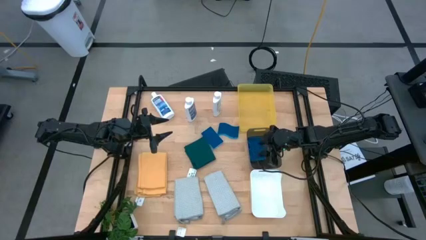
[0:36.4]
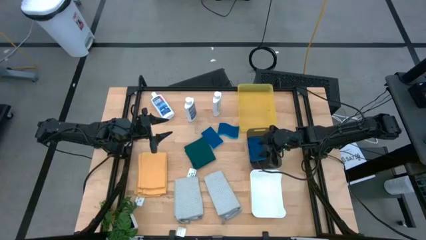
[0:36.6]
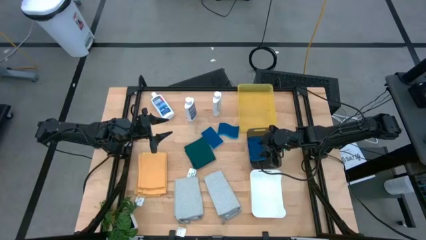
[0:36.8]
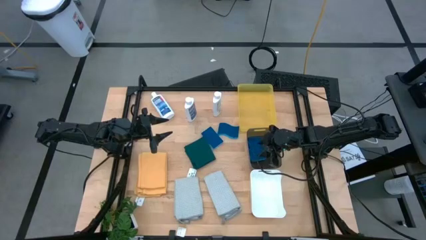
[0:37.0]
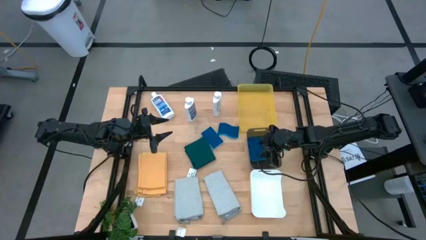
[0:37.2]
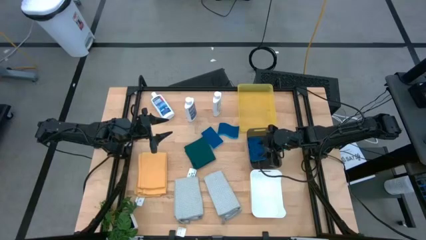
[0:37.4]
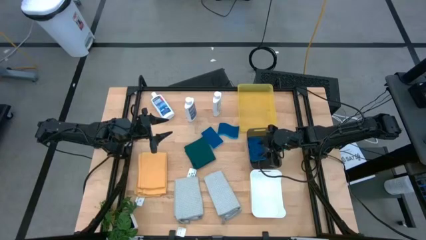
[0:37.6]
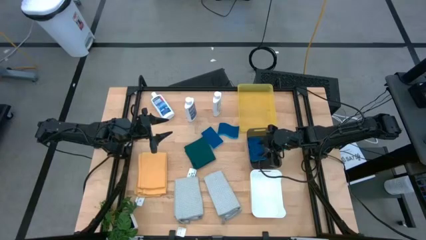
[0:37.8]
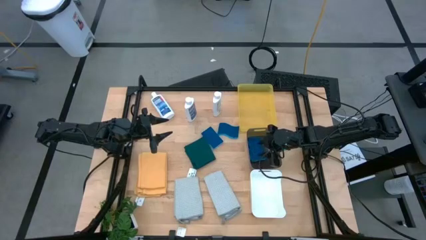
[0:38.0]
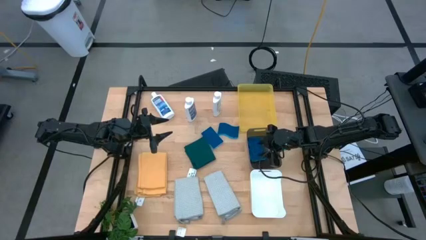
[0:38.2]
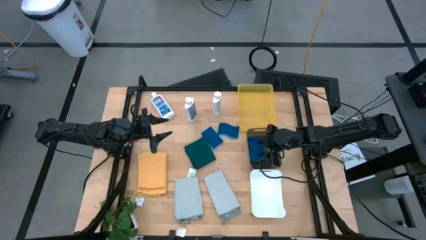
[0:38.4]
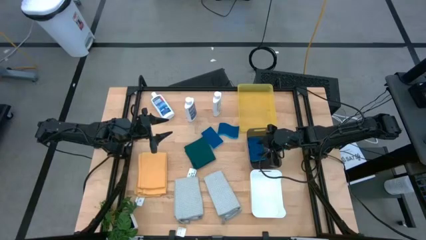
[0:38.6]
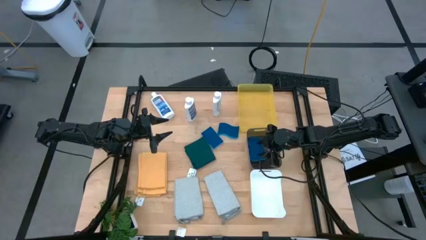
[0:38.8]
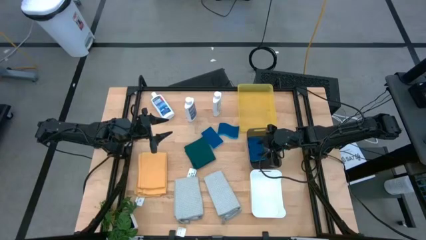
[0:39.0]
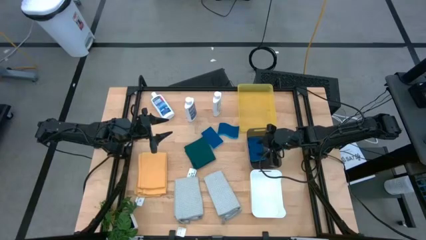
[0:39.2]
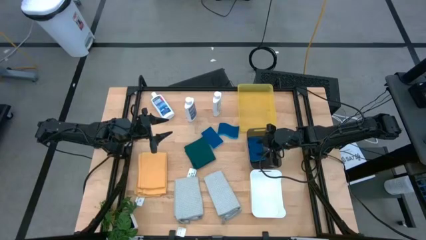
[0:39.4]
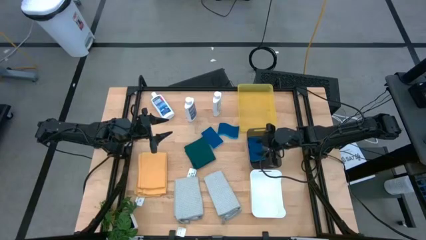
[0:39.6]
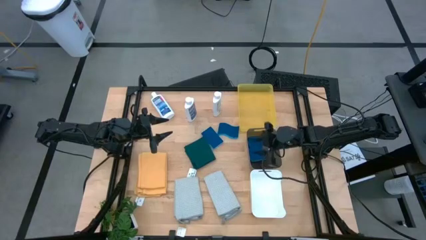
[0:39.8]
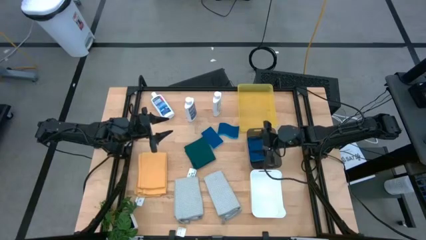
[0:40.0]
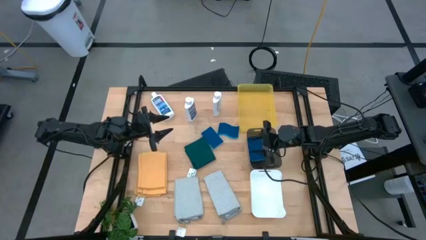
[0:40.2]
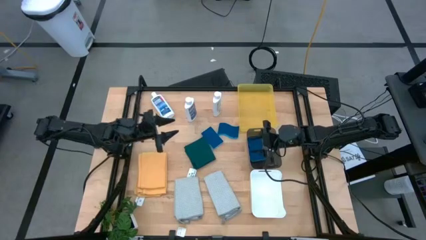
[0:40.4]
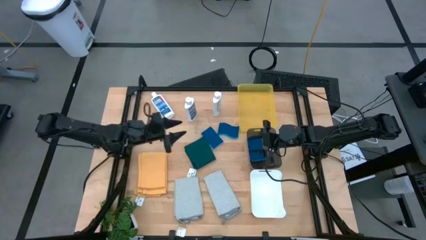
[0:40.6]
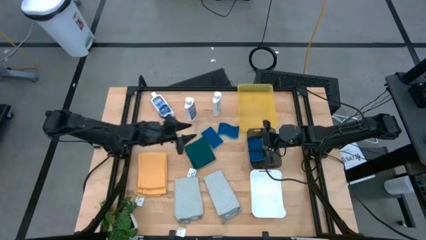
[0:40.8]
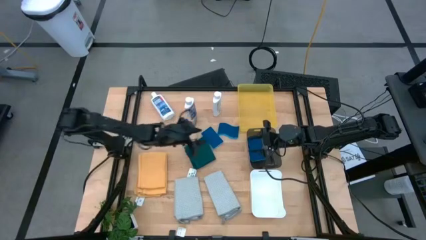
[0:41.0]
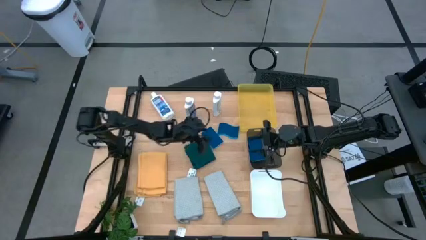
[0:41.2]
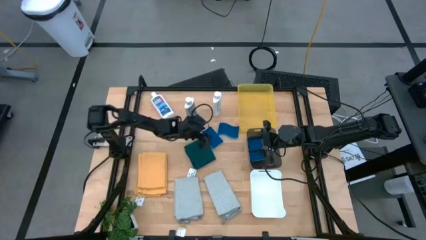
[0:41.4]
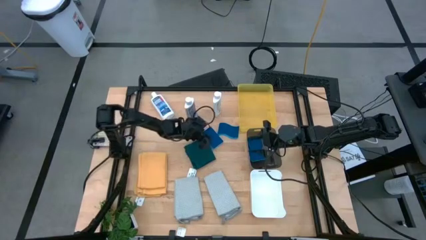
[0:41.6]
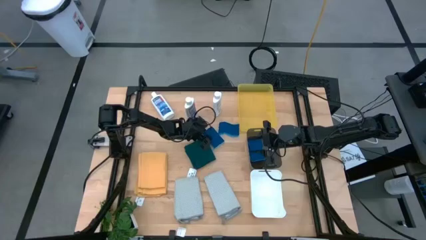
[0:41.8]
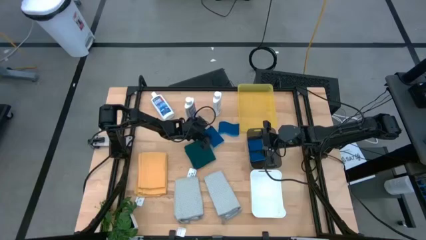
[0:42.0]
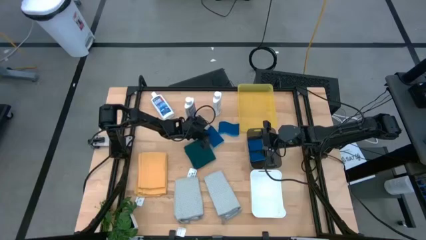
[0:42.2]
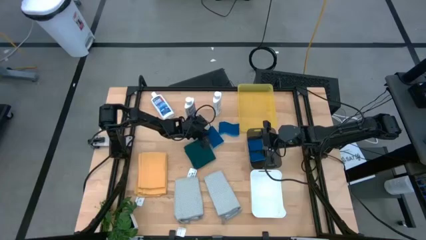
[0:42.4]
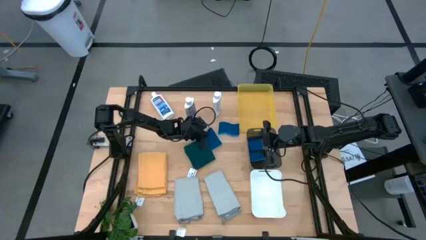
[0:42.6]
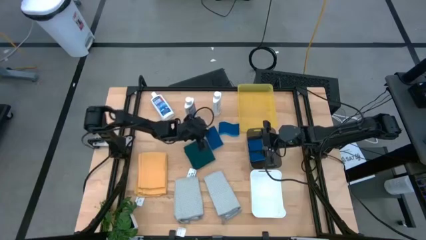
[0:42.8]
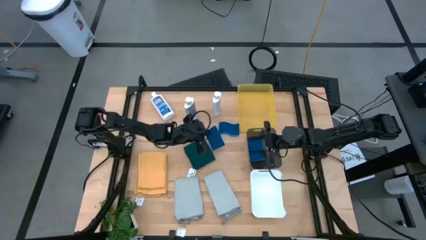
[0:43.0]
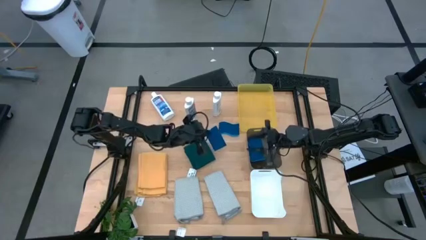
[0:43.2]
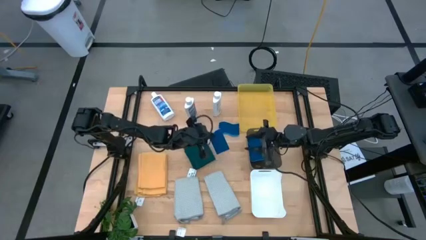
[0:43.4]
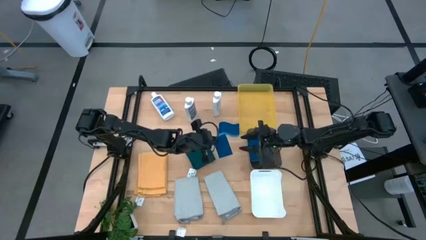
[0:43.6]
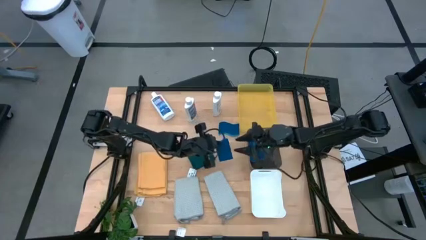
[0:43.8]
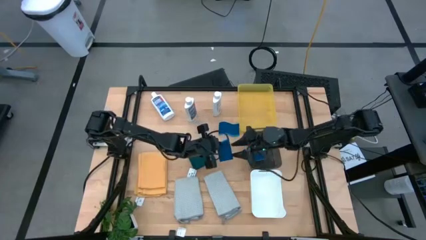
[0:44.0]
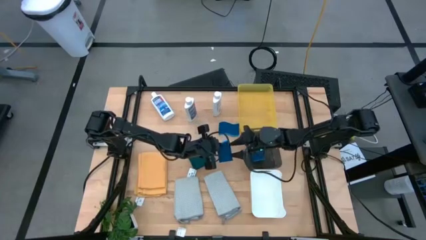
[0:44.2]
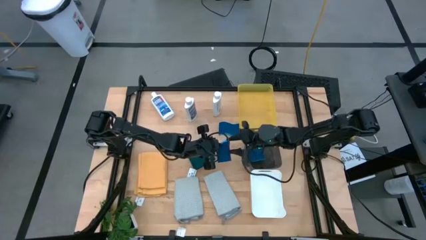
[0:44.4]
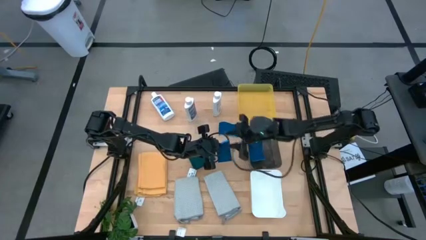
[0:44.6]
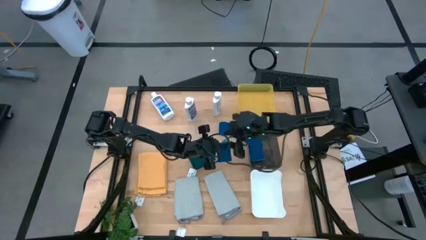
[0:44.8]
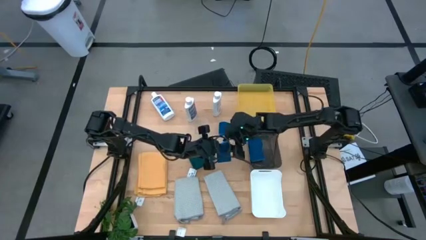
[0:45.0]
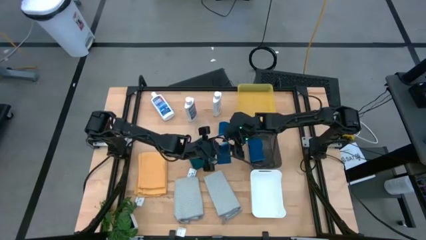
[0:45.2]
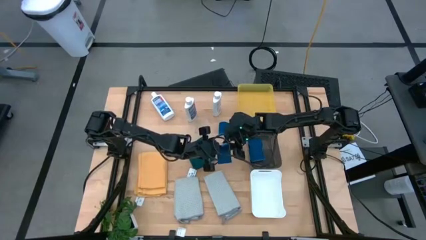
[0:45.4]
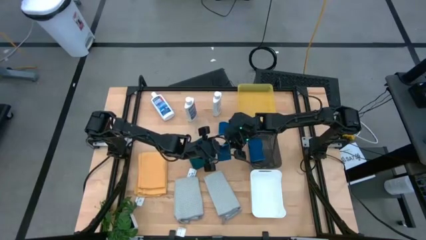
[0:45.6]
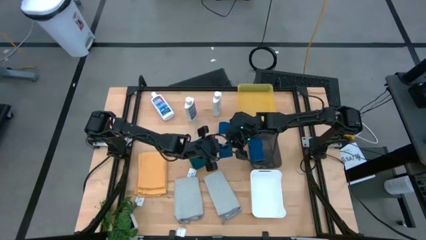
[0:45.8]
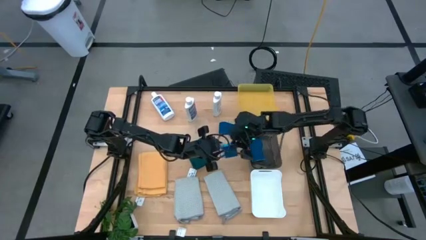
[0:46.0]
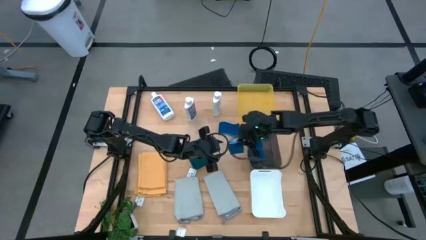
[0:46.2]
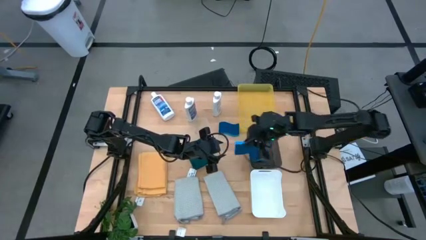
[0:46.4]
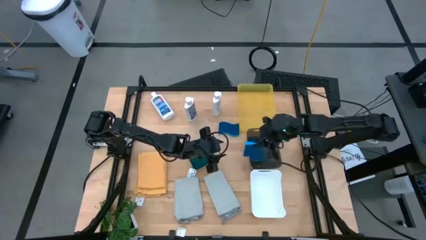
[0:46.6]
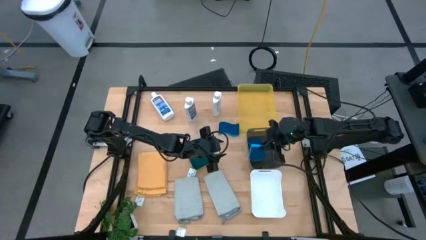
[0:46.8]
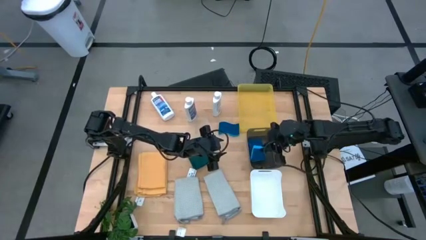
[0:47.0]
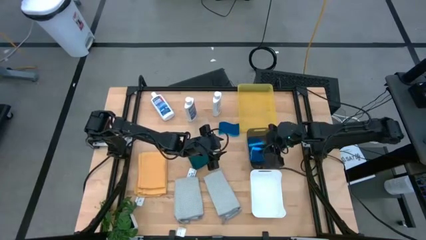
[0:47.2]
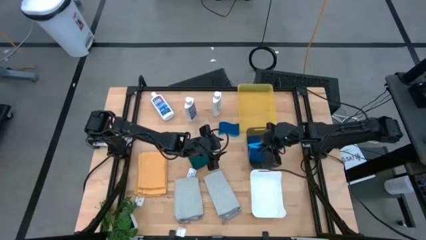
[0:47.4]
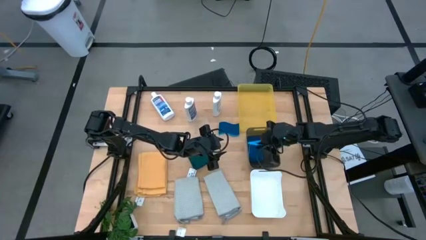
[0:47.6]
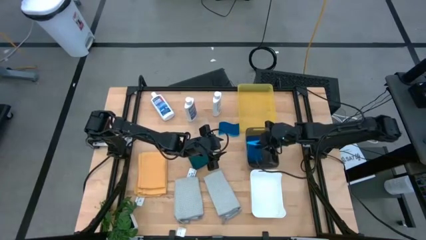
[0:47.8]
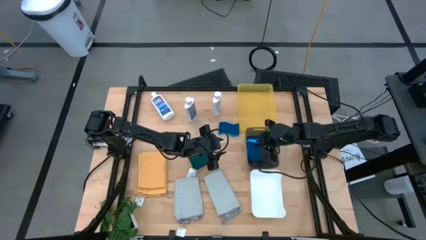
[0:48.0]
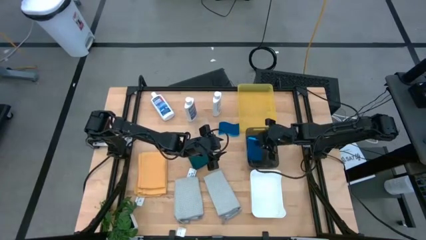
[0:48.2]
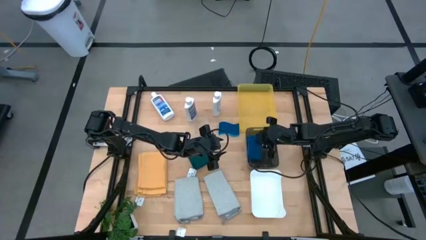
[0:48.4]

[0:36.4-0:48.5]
Task: Pick & Place Kitchen Items
Put the blue sponge into the black bin
